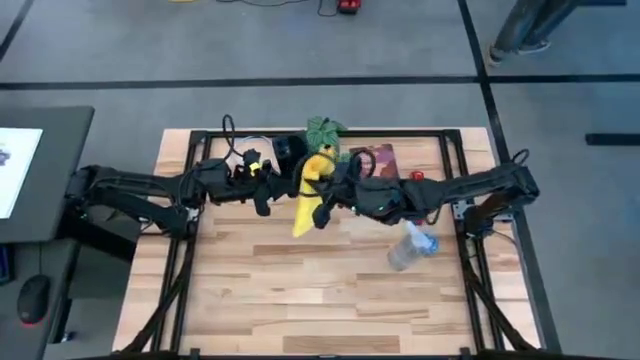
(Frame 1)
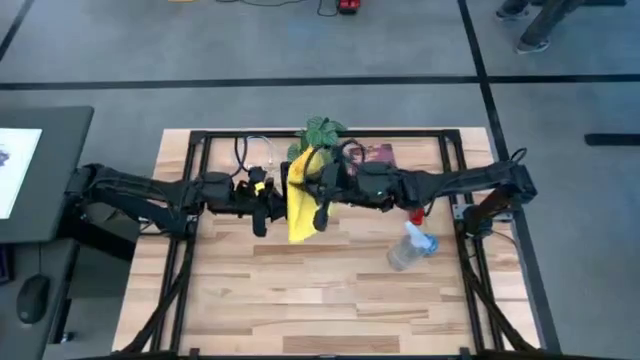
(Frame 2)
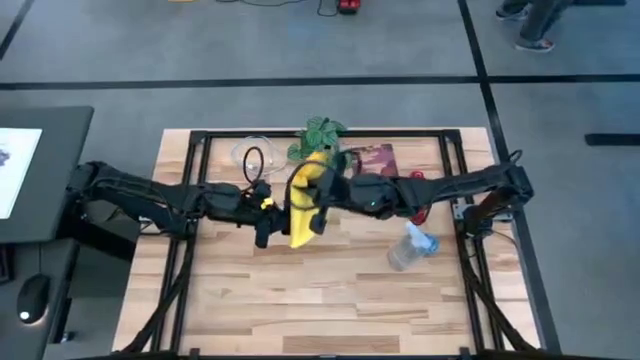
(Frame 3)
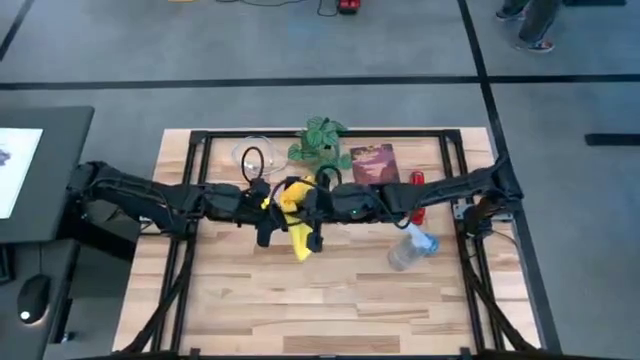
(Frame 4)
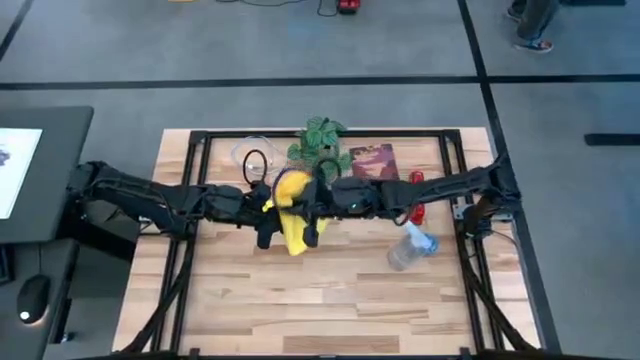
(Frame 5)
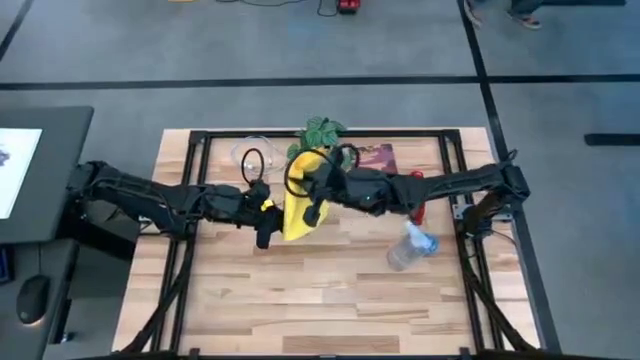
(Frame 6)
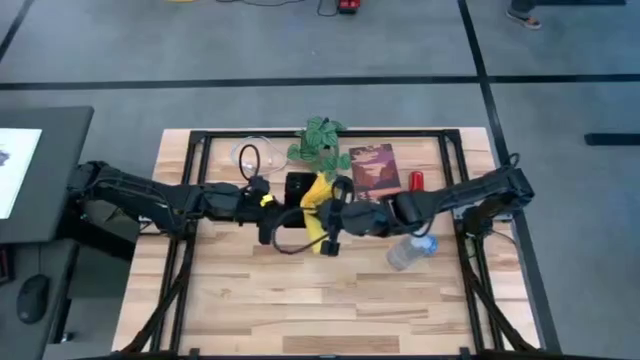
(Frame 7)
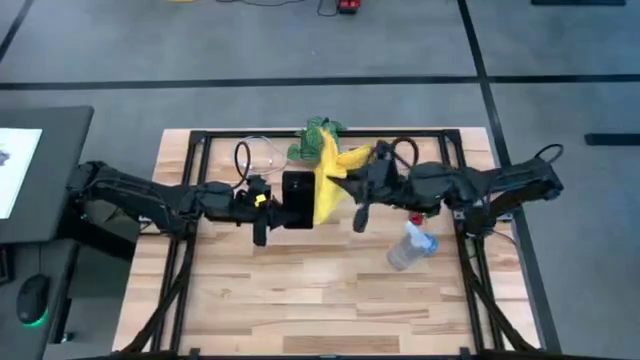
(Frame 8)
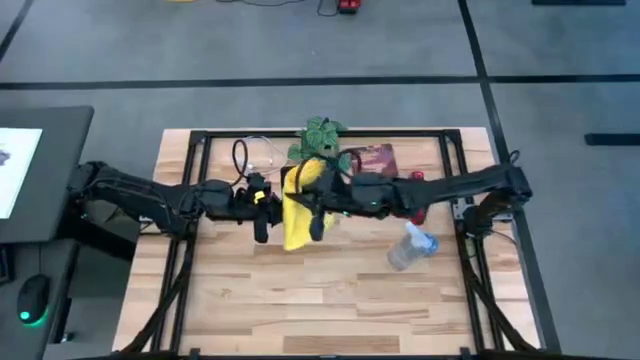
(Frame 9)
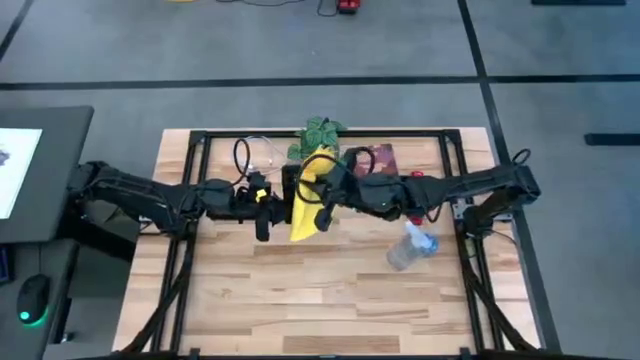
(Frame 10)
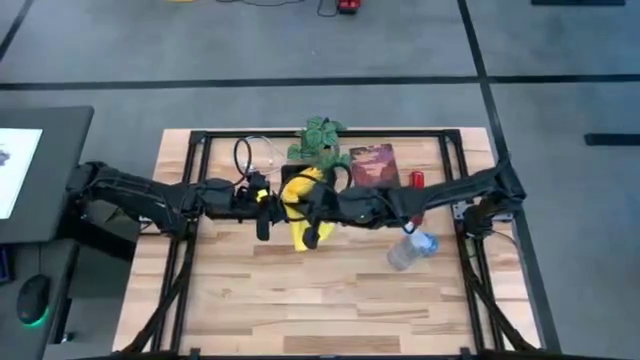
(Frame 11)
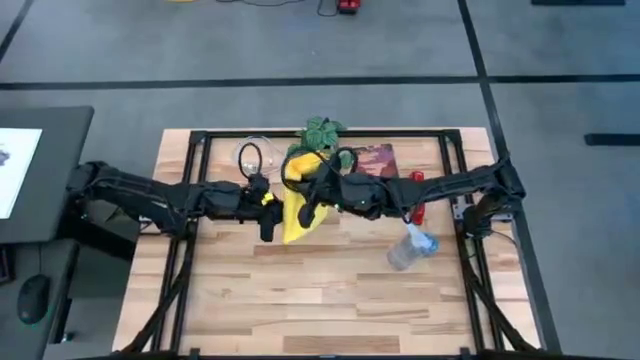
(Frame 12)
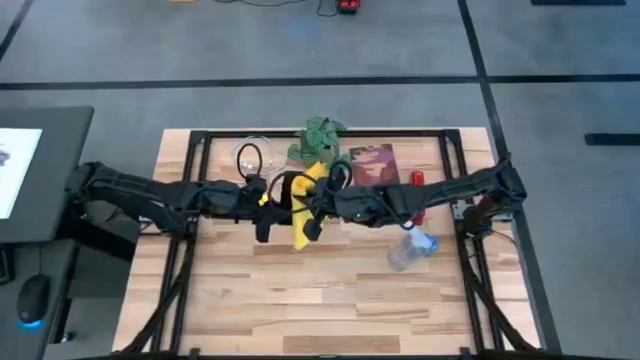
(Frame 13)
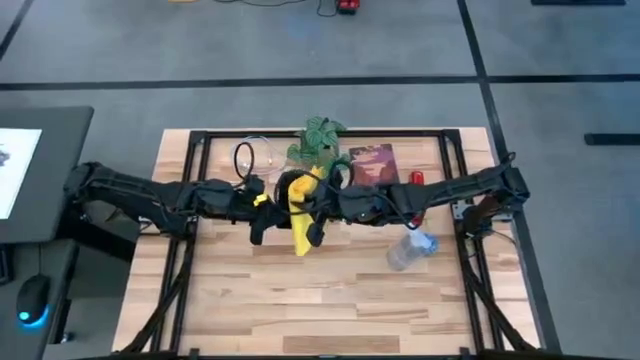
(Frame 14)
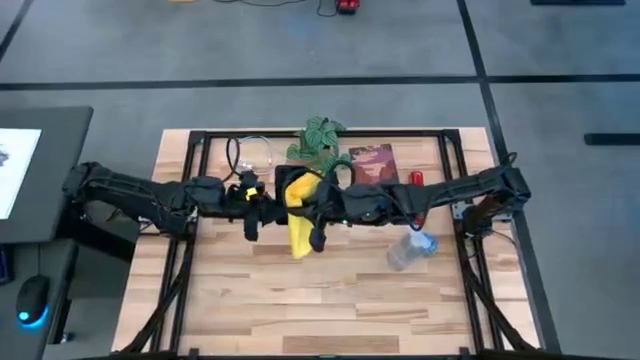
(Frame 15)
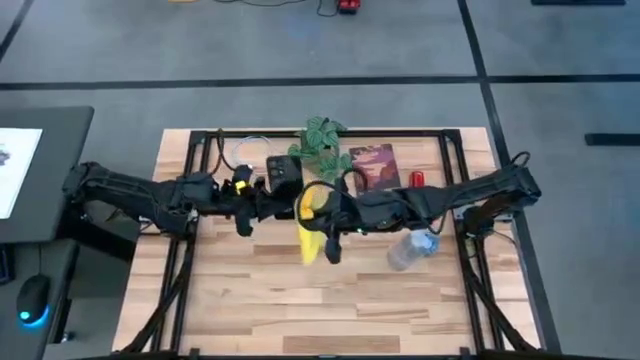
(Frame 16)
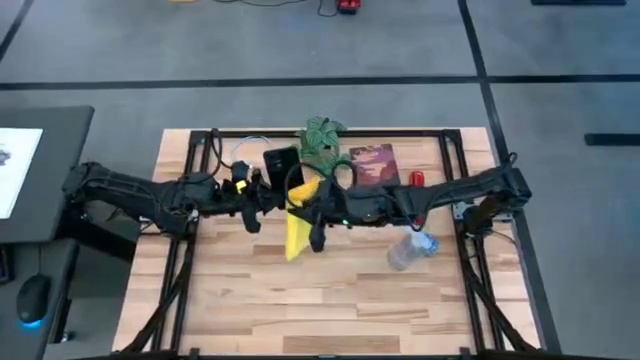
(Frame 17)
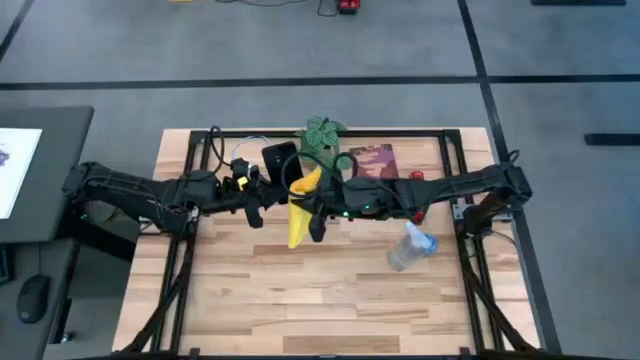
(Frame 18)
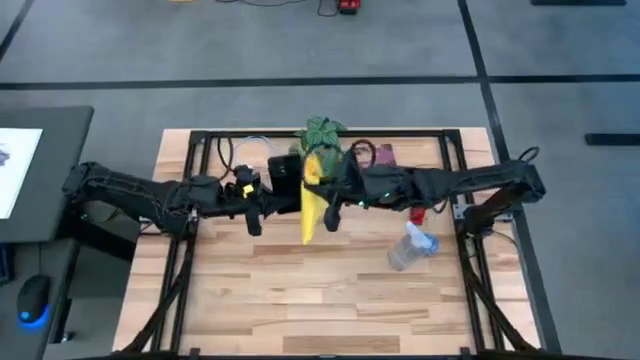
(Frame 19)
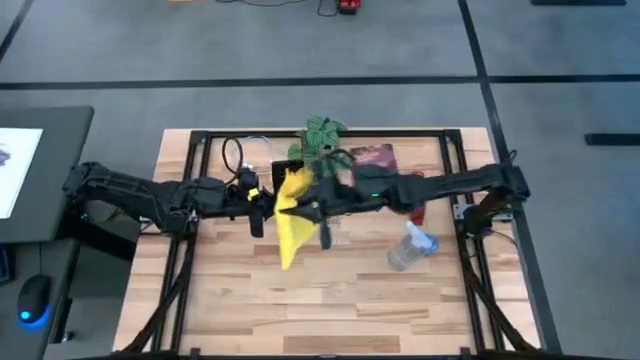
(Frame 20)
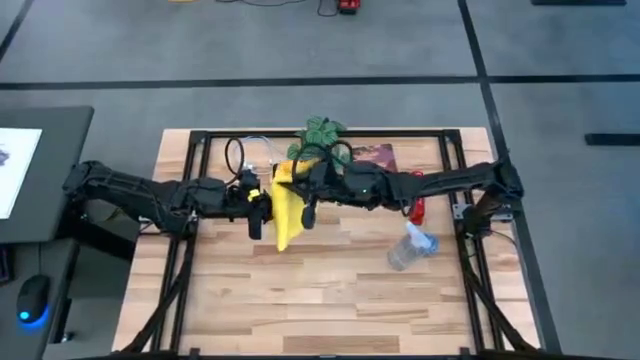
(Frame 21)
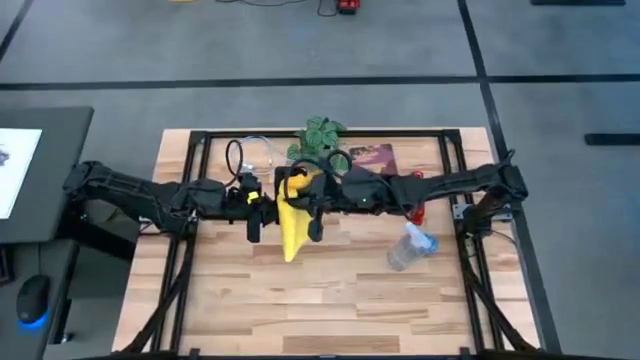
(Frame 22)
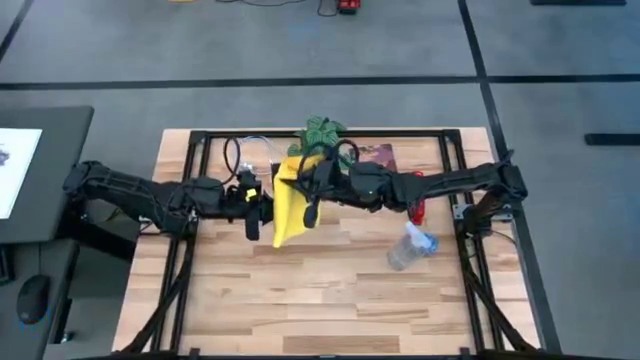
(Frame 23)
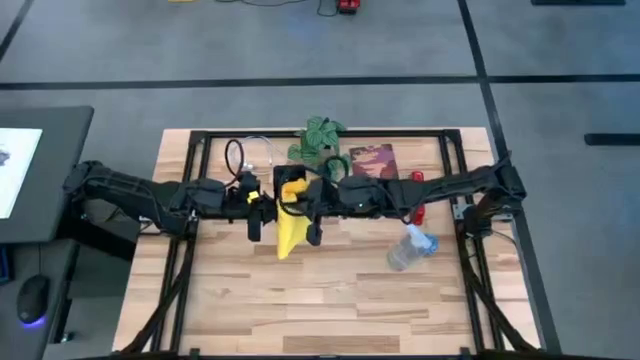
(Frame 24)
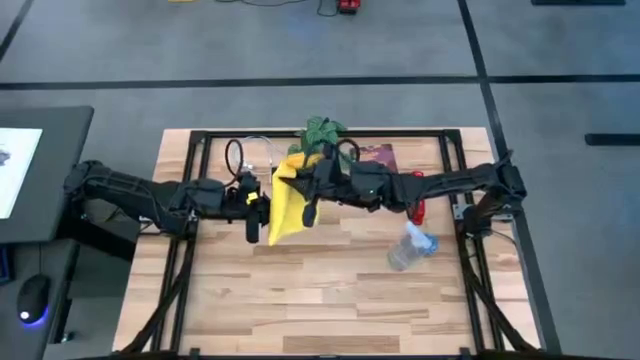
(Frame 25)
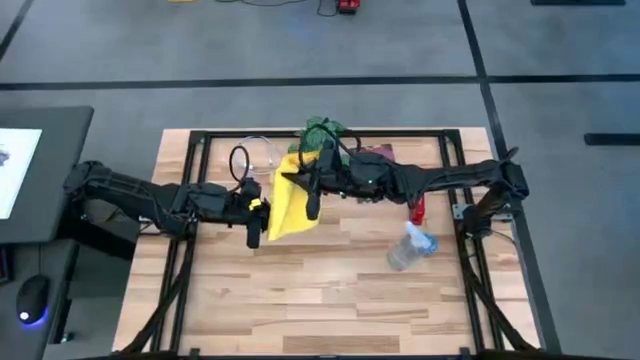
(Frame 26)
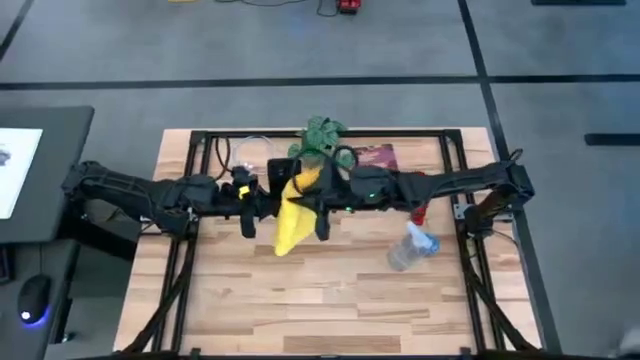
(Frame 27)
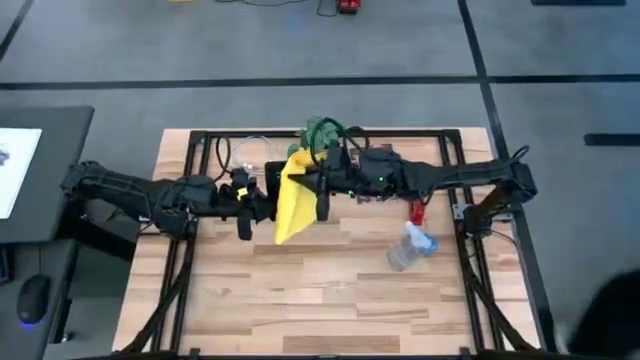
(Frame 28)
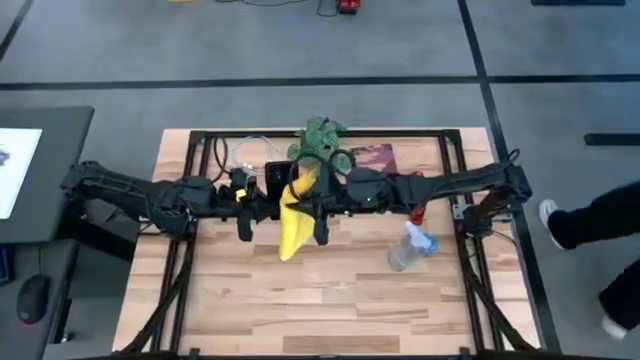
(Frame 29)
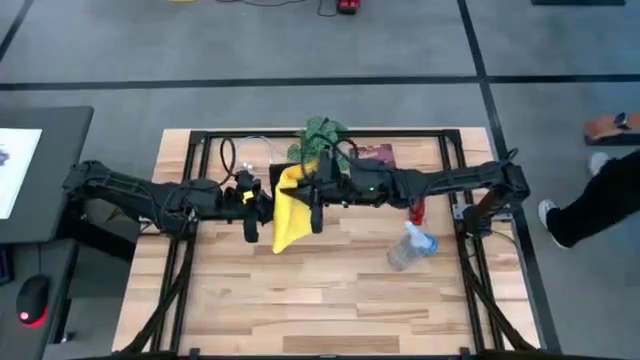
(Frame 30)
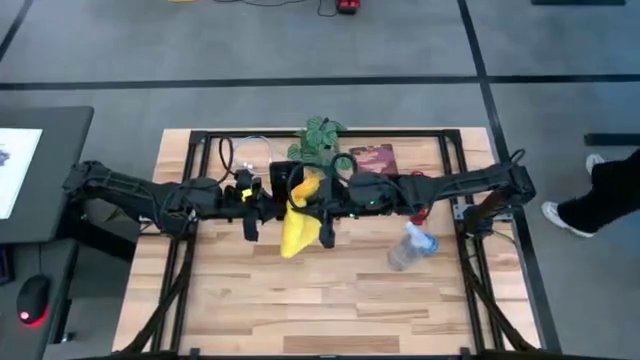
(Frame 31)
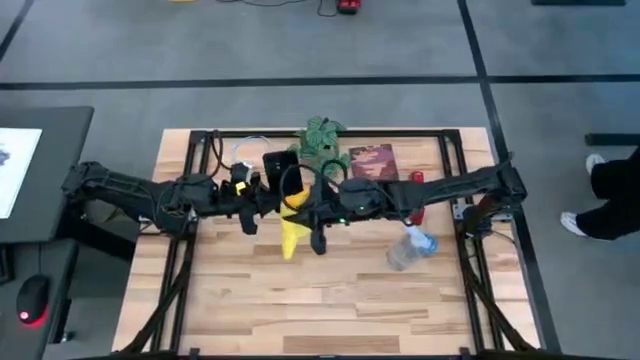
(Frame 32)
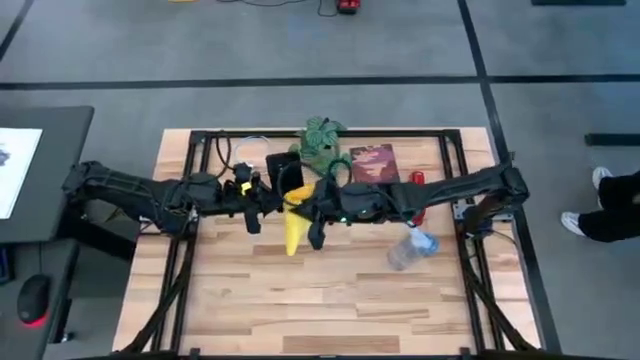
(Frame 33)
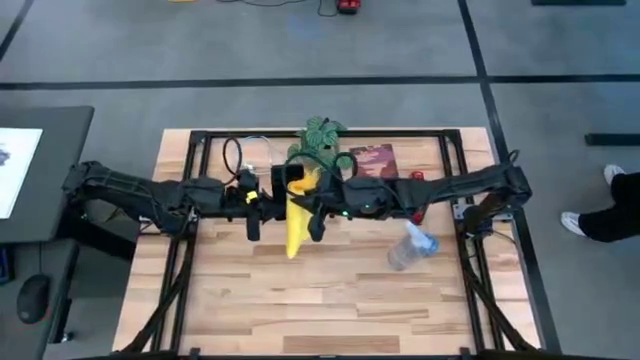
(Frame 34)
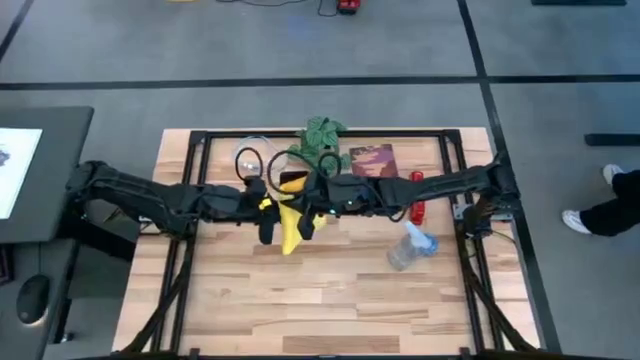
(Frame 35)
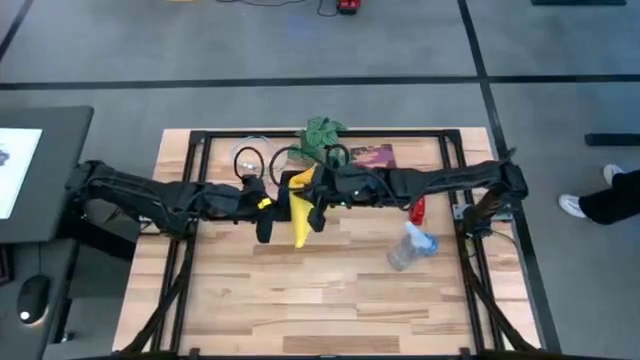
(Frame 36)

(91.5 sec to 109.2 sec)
Task: Apply microfiber cloth
Wipe the back and front of the cellphone with the yellow microfiber cloth

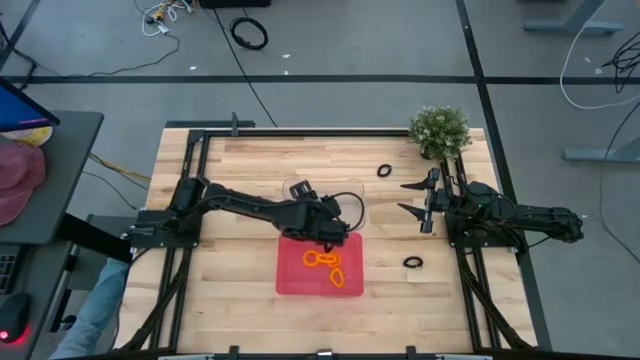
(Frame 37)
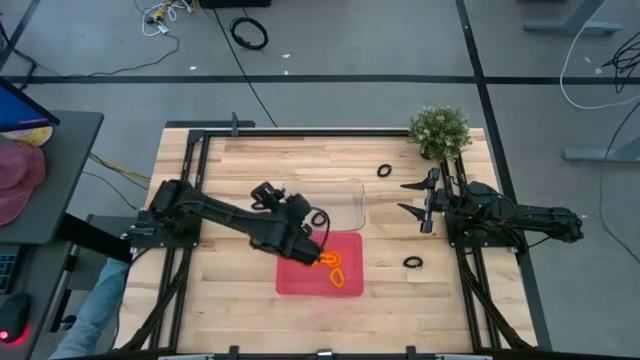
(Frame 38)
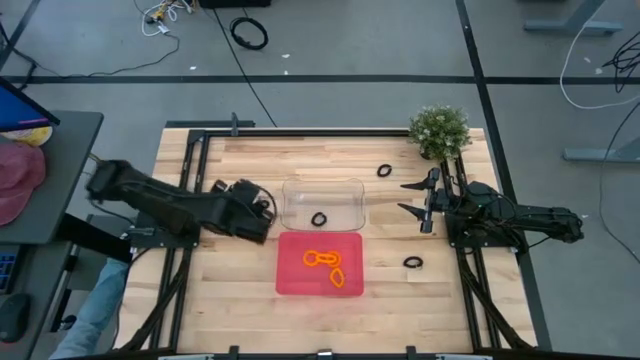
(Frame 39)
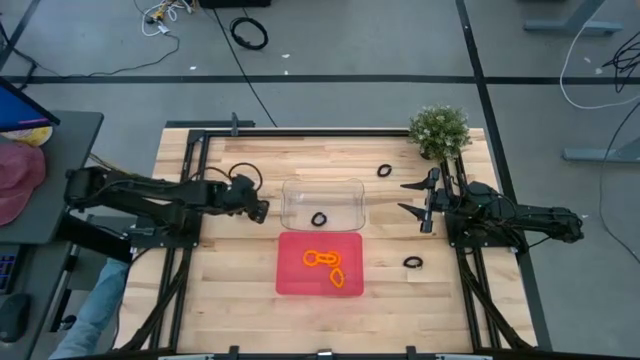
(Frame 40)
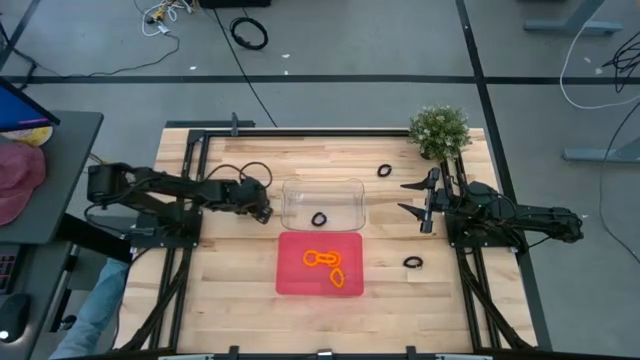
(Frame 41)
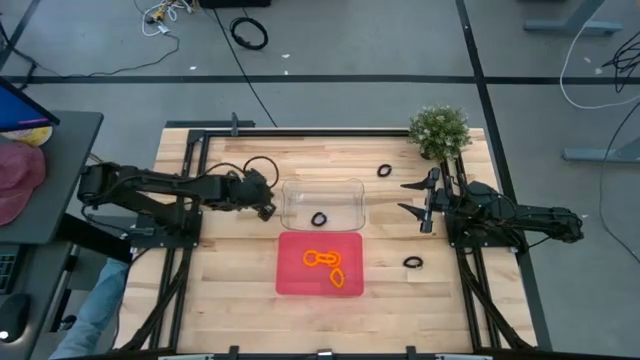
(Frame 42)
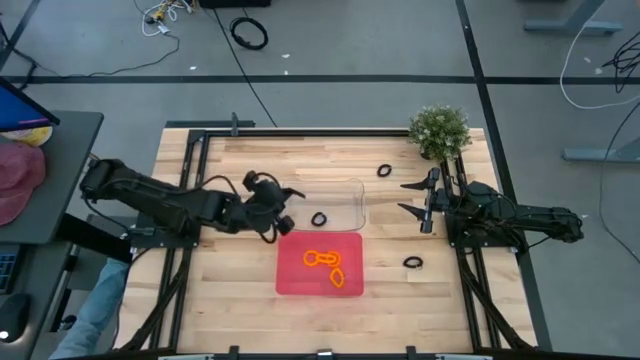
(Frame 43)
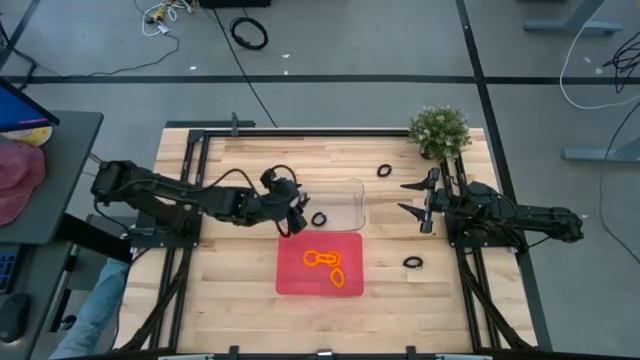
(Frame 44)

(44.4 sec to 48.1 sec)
Task: Sort spring keychains
Put the black spring keychain into the transparent bin
